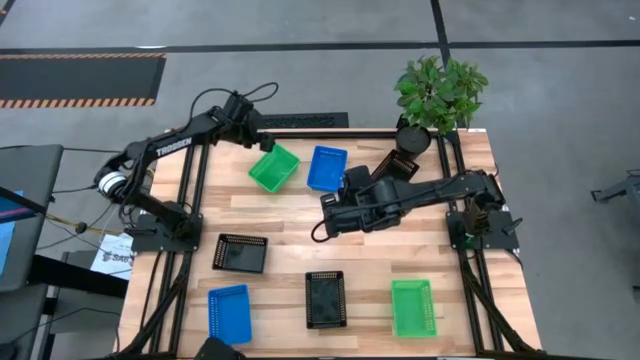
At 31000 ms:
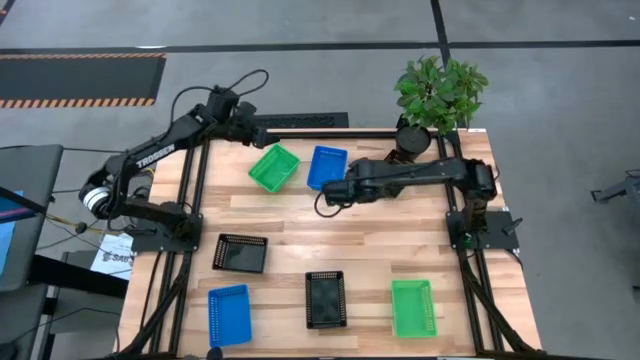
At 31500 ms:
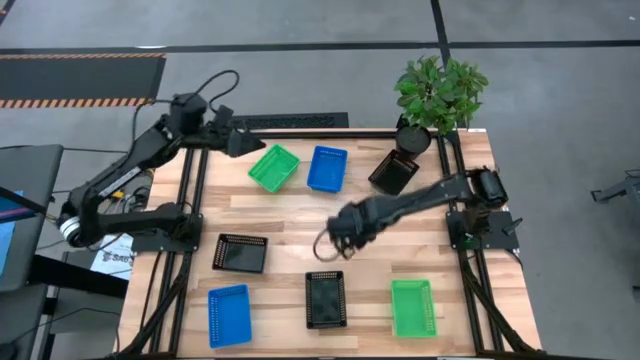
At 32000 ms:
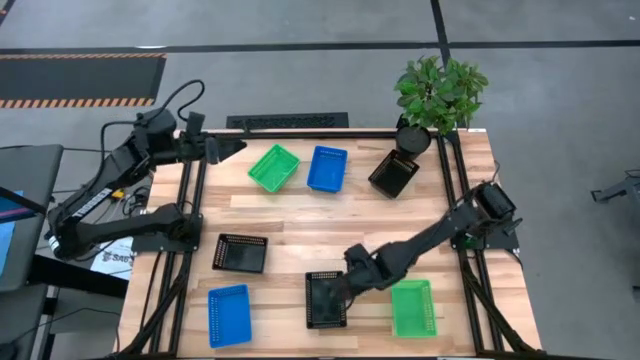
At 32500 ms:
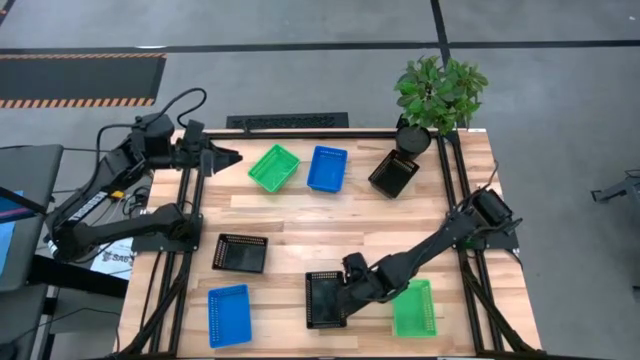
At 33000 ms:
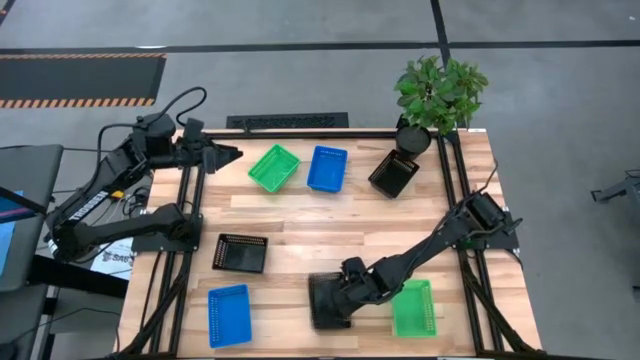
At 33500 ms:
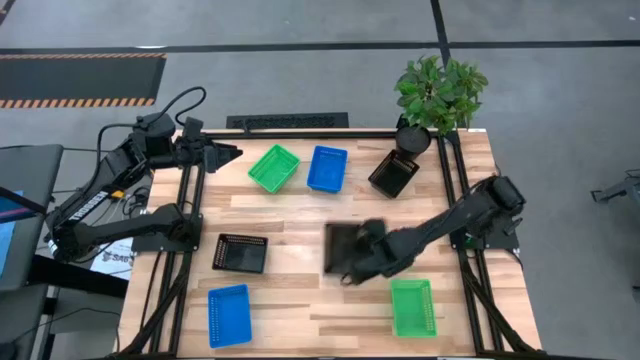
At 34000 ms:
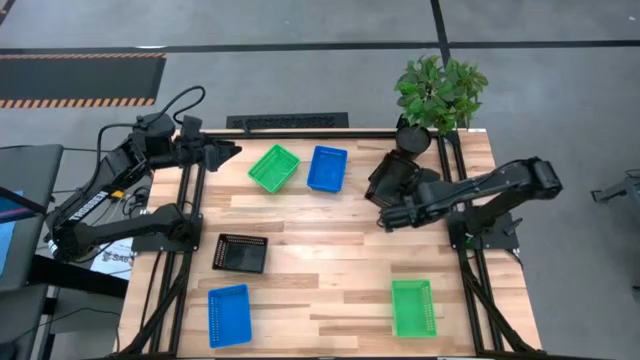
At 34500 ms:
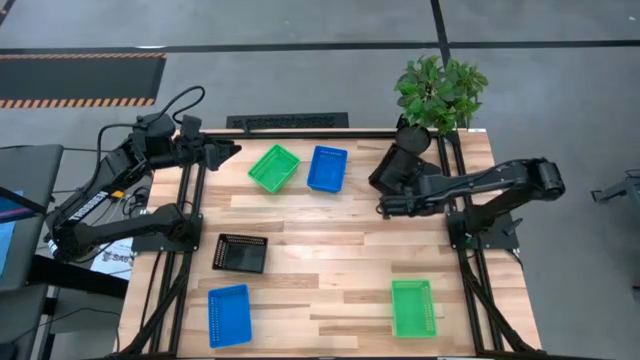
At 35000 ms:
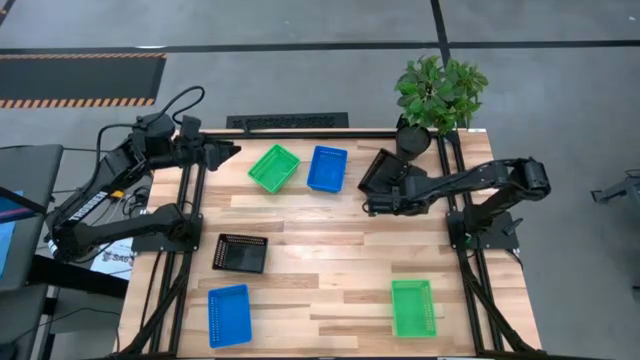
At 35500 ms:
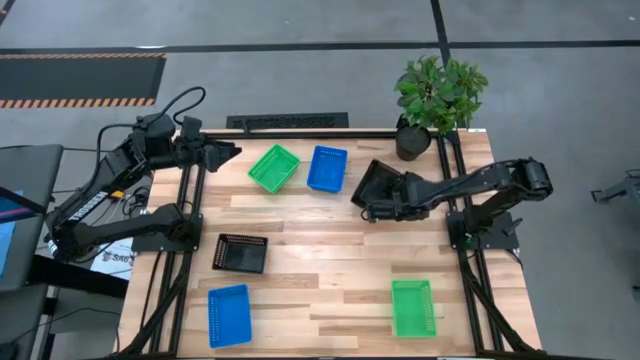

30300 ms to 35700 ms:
Stack the bottom black bin on the top black bin

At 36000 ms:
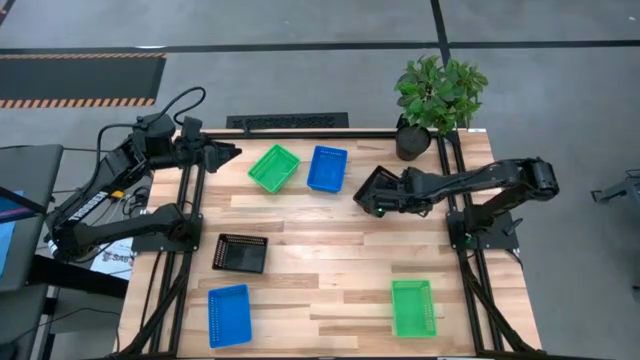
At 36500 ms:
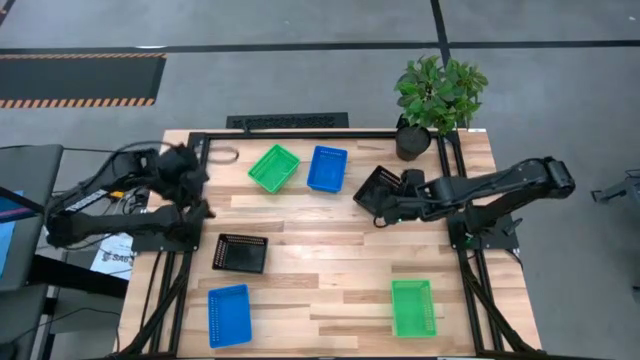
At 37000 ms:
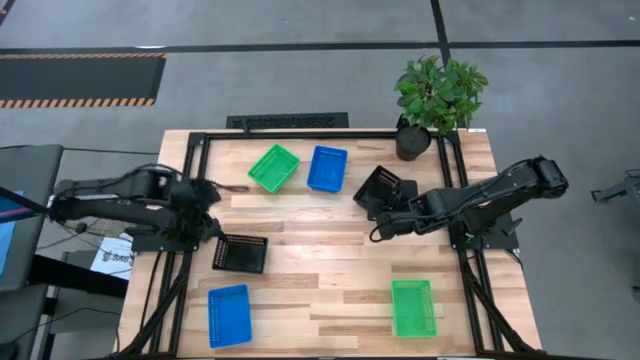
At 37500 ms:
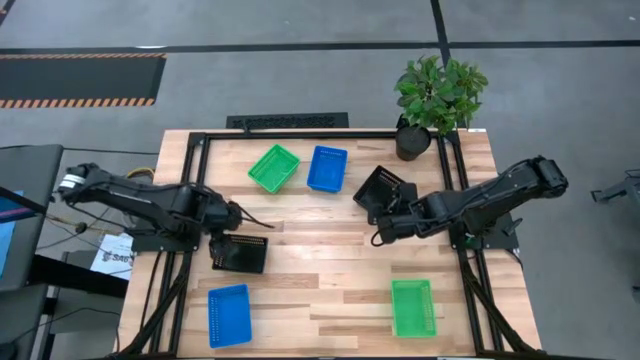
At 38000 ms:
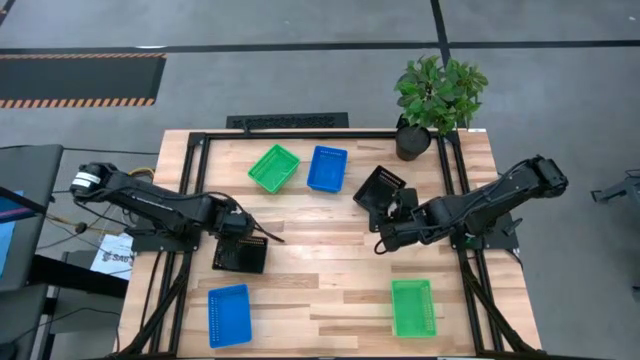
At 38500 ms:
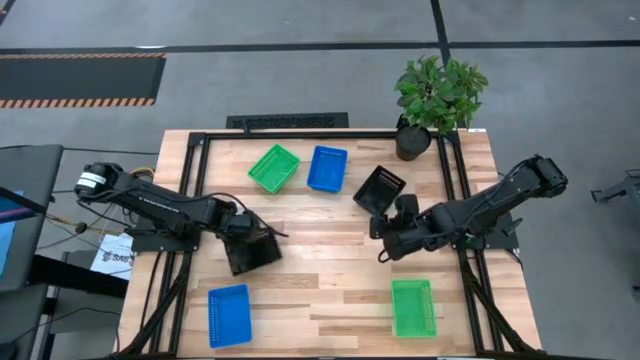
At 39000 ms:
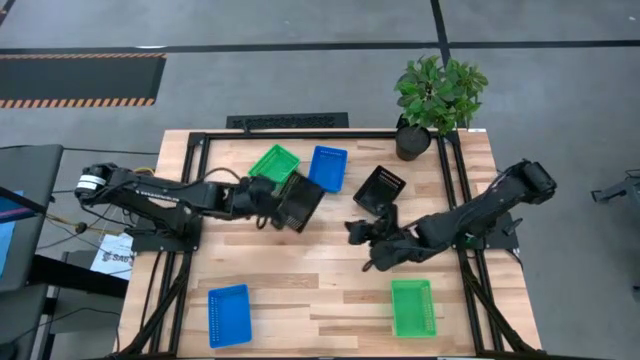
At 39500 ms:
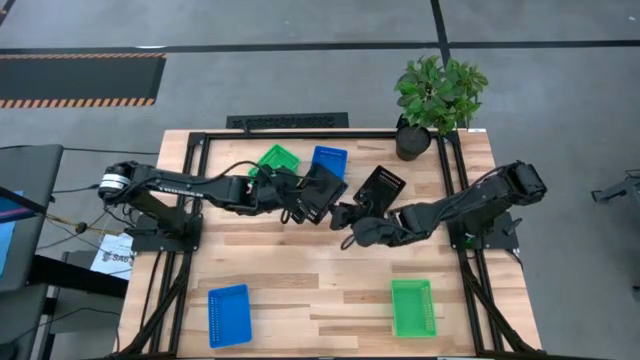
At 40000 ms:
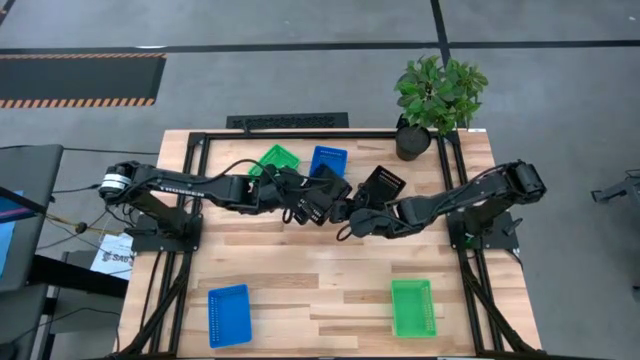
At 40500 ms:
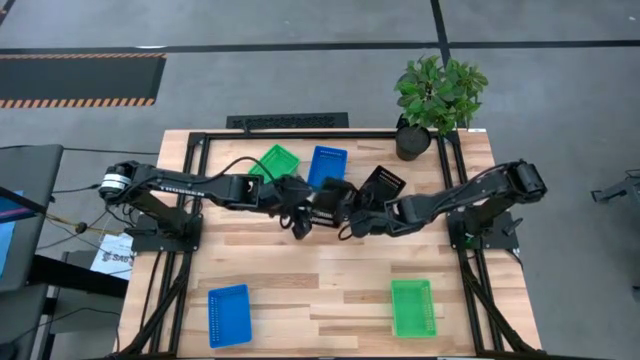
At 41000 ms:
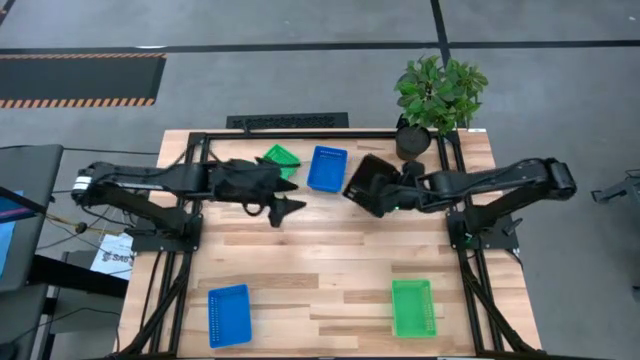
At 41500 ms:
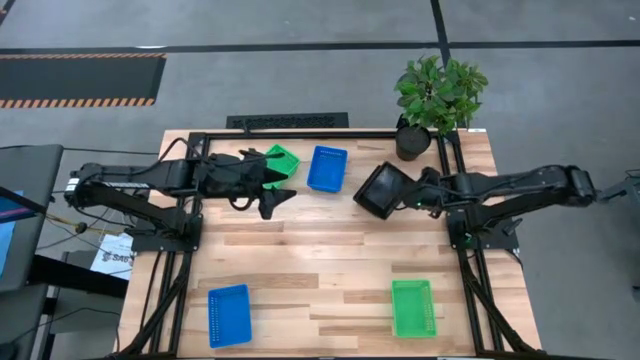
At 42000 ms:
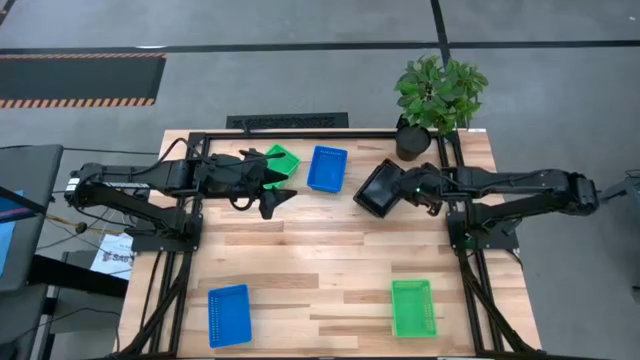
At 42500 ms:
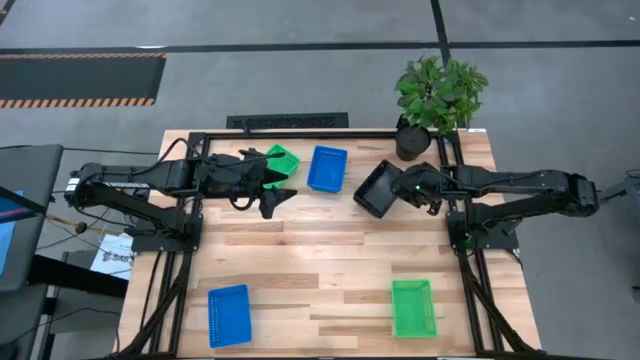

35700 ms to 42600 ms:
Stack the black bin on the stacked black bins

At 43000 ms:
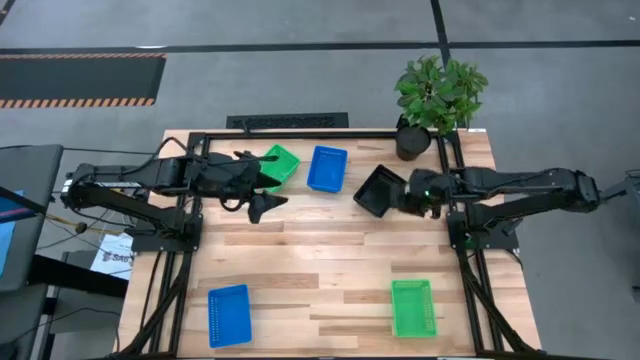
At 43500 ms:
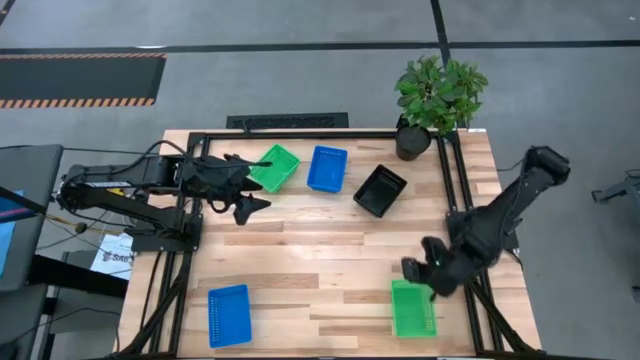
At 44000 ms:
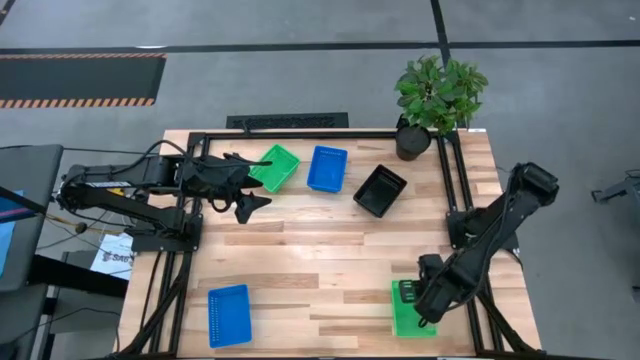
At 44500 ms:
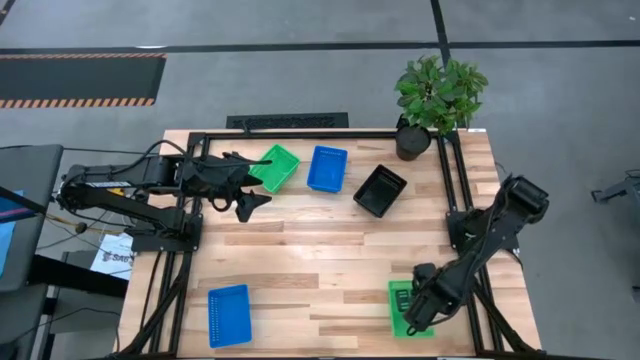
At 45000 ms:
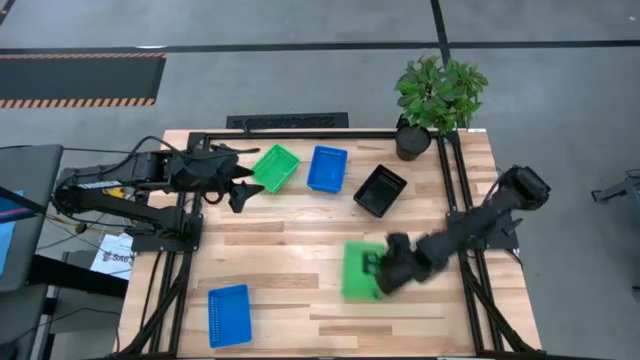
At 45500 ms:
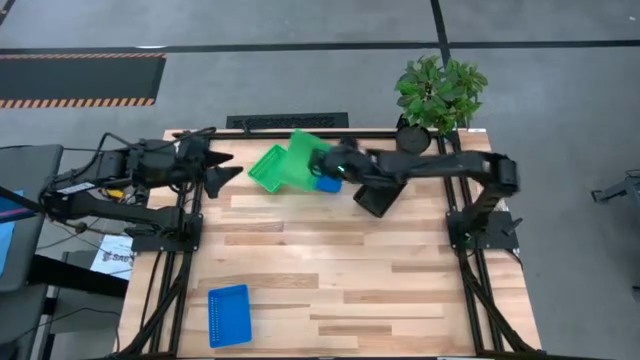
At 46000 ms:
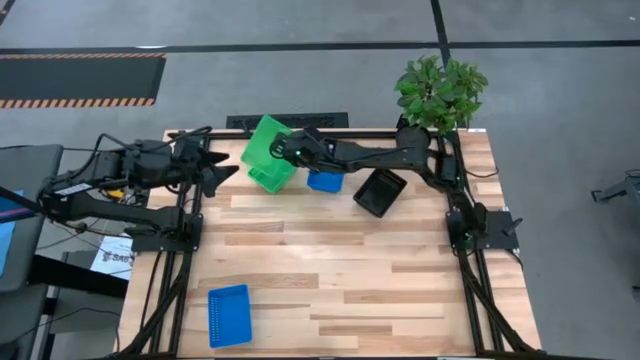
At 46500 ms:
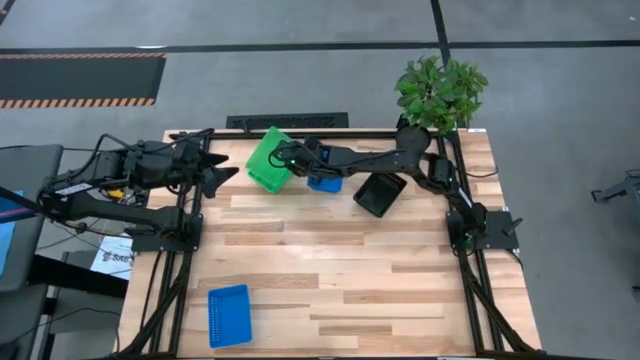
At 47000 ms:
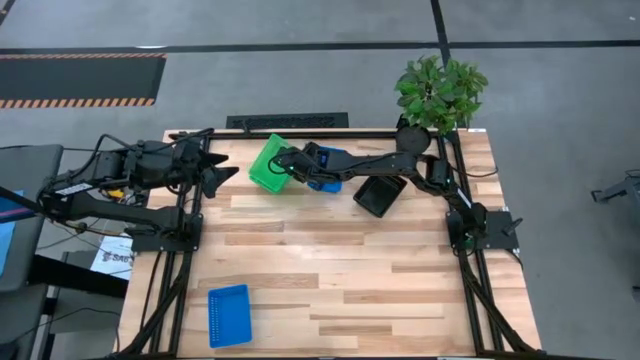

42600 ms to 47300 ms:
Stack the green bin on the stacked green bins

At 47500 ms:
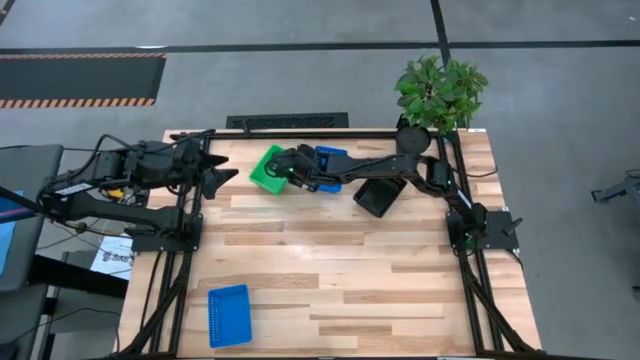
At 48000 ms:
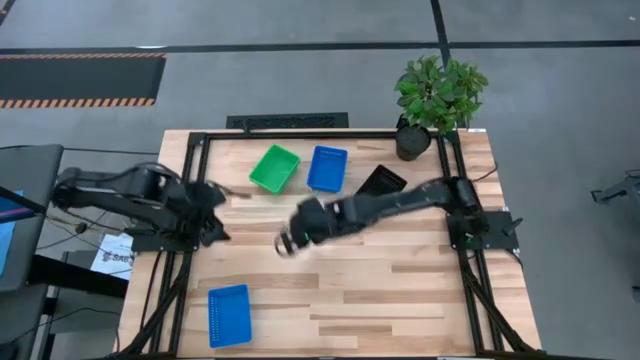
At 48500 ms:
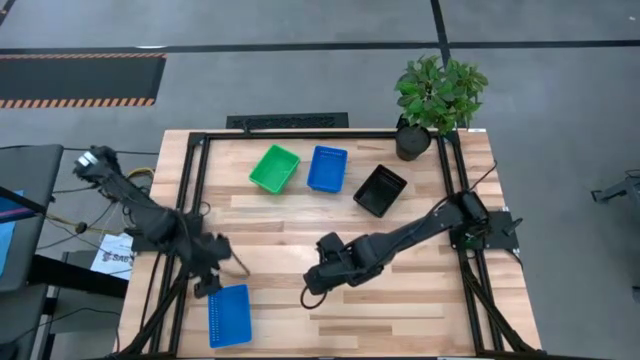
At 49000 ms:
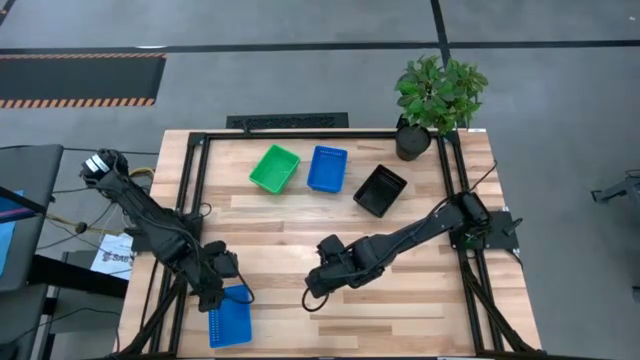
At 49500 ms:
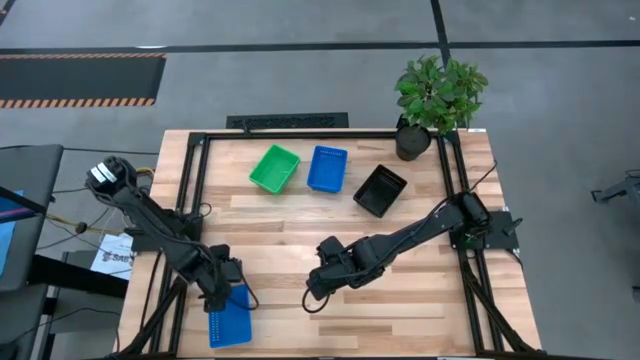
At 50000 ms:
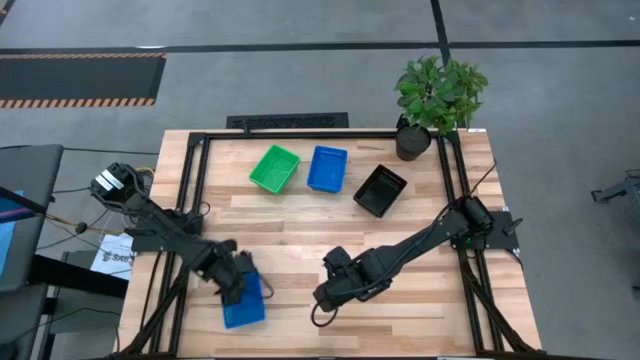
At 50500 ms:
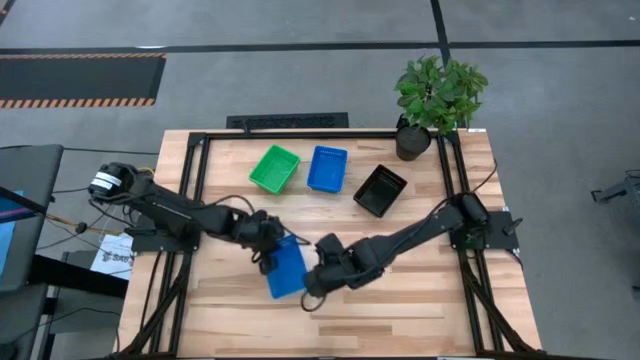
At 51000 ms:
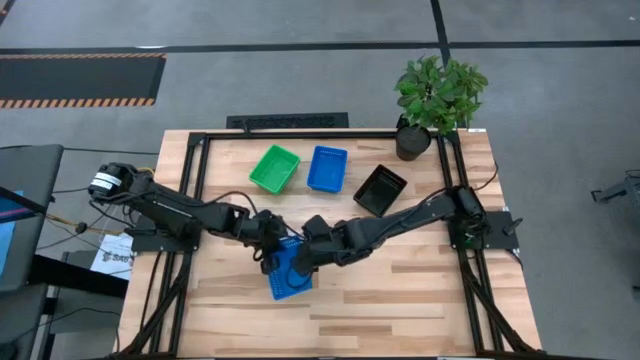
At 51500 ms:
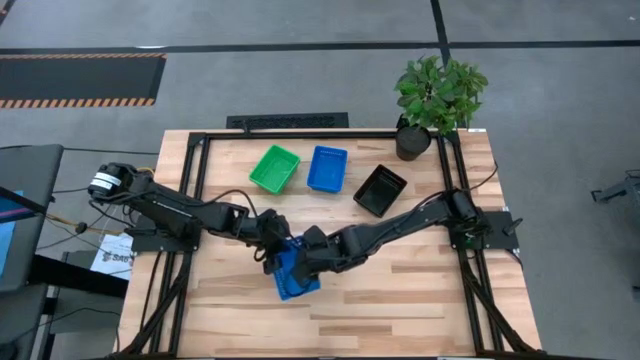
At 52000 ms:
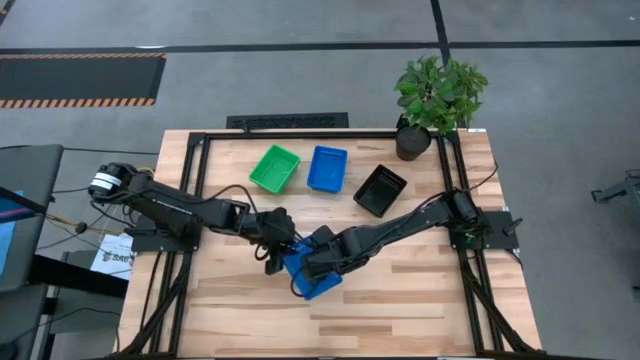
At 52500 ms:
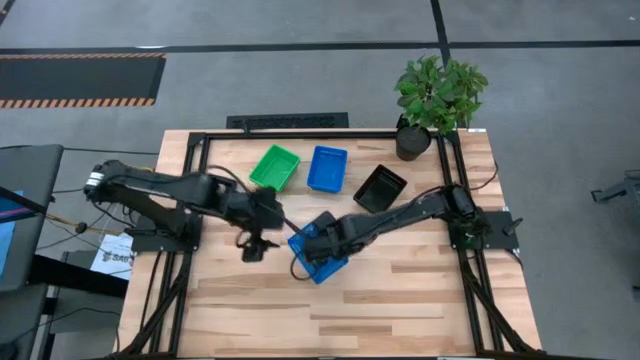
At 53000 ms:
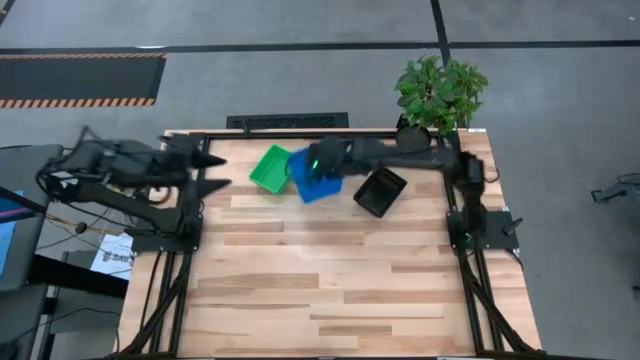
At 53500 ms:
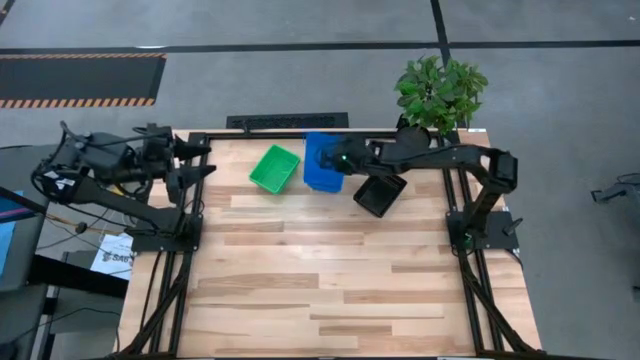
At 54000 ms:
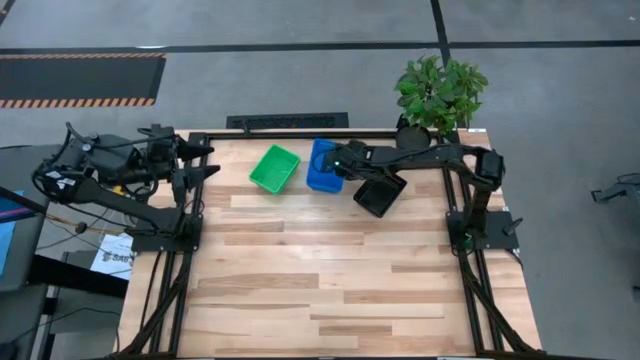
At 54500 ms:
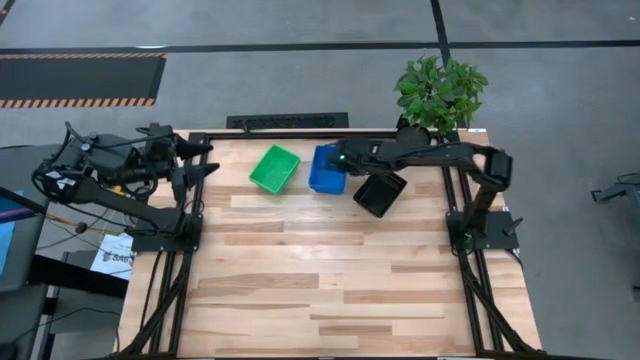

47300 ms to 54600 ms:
Stack the blue bin on the stacked blue bins
